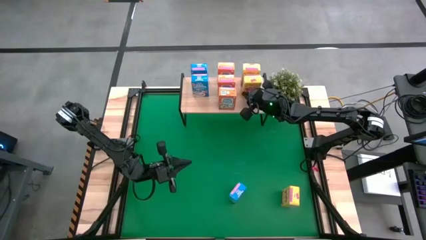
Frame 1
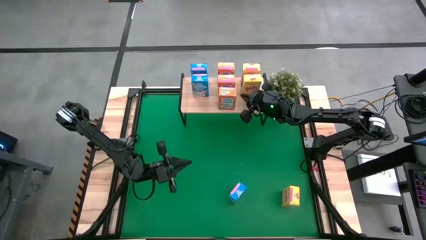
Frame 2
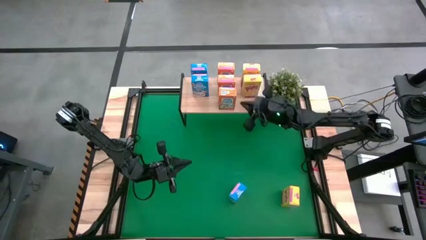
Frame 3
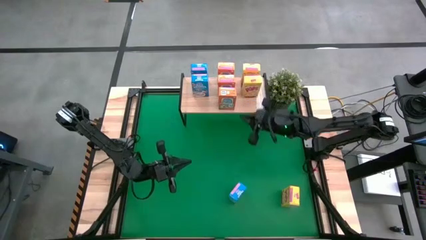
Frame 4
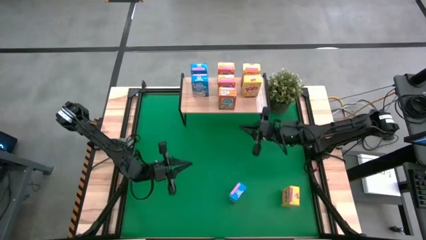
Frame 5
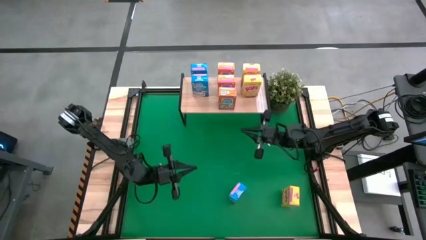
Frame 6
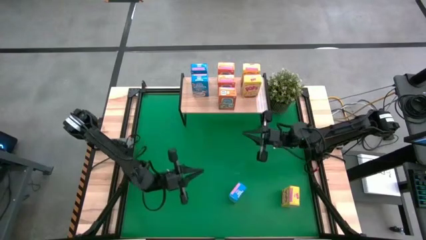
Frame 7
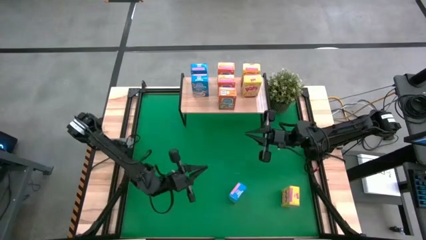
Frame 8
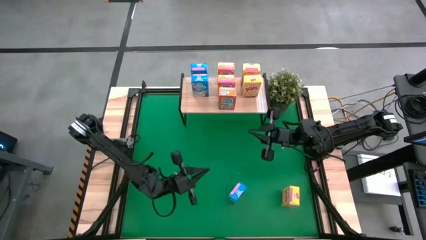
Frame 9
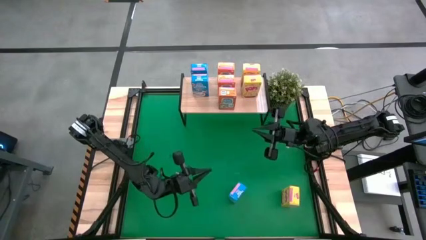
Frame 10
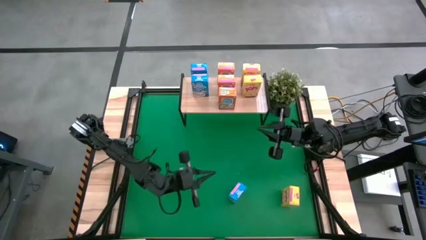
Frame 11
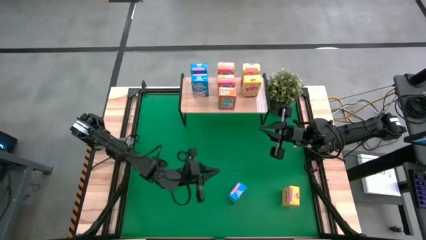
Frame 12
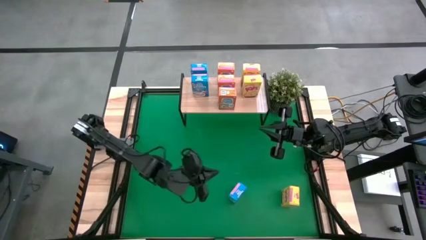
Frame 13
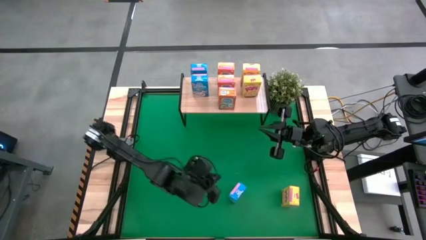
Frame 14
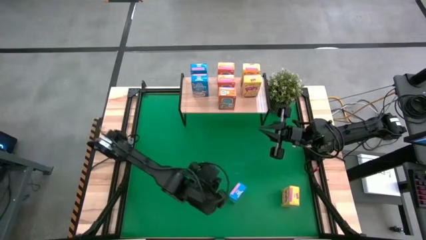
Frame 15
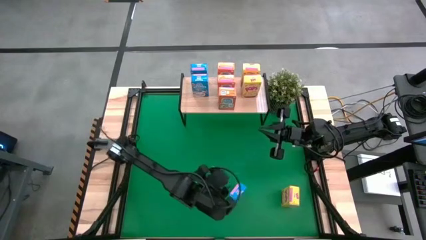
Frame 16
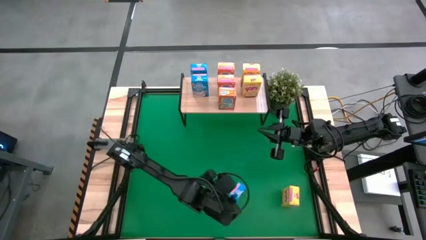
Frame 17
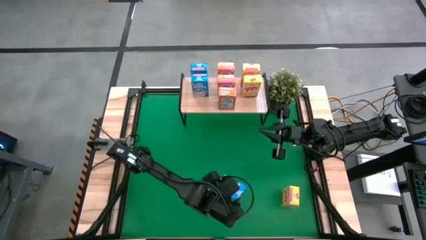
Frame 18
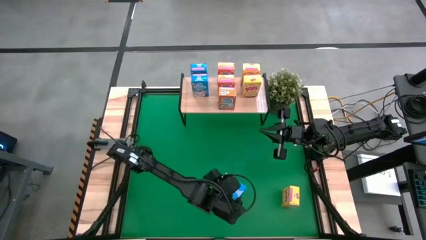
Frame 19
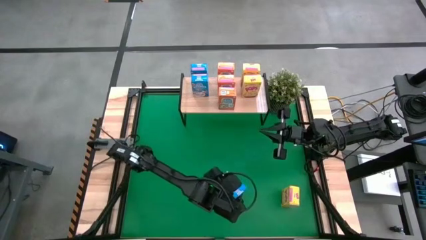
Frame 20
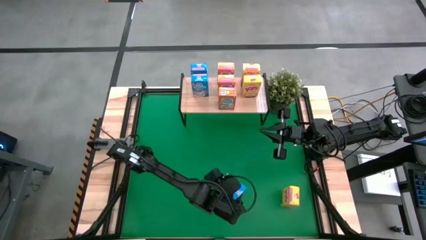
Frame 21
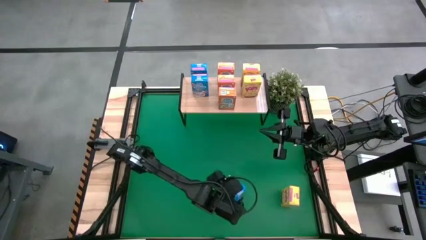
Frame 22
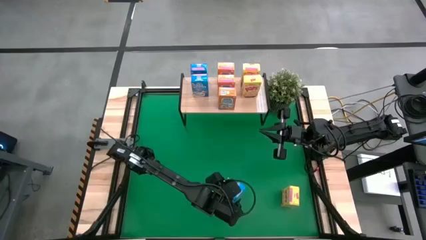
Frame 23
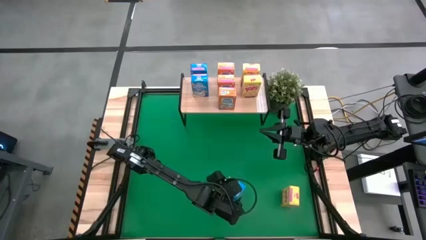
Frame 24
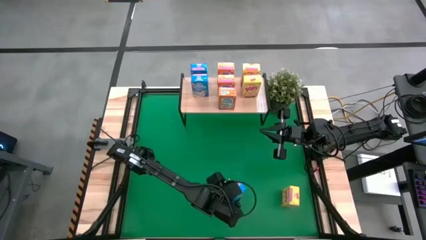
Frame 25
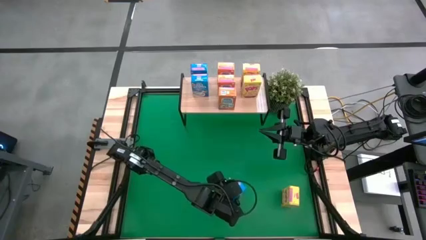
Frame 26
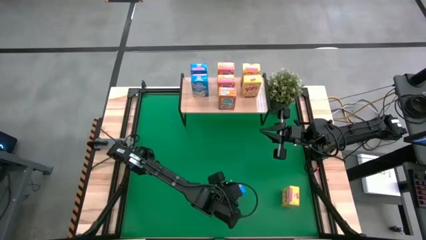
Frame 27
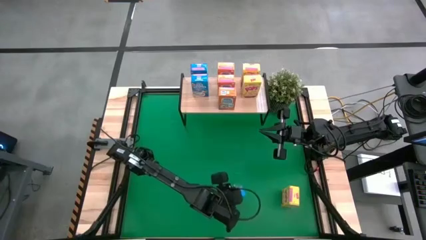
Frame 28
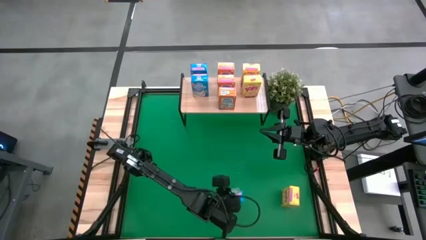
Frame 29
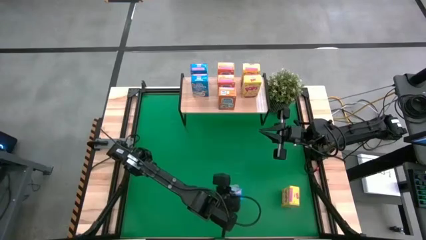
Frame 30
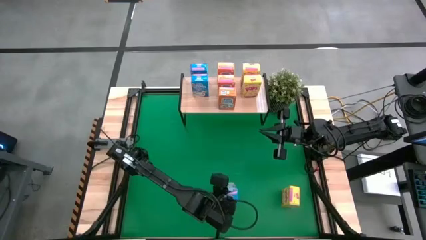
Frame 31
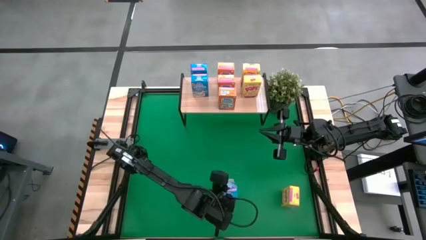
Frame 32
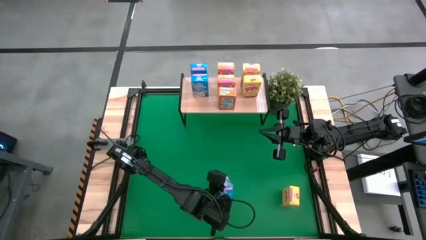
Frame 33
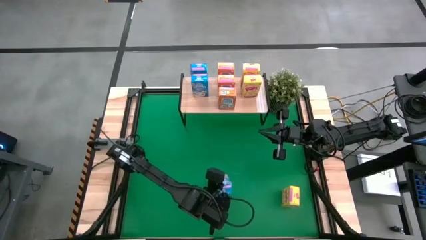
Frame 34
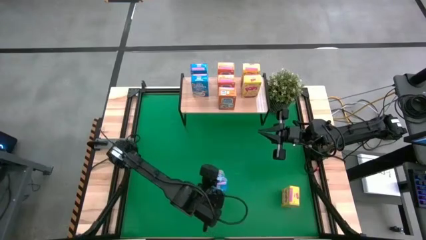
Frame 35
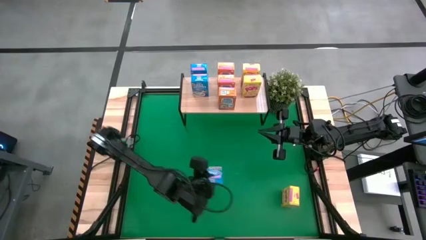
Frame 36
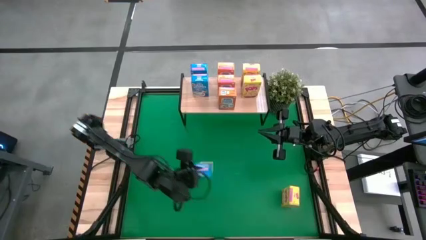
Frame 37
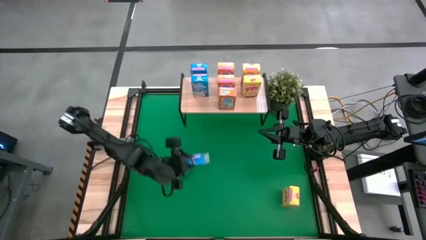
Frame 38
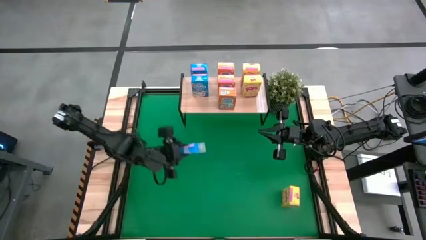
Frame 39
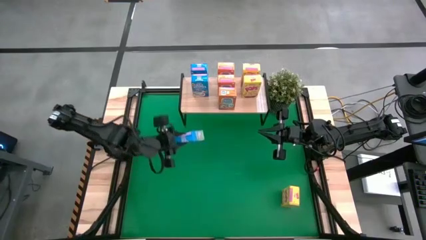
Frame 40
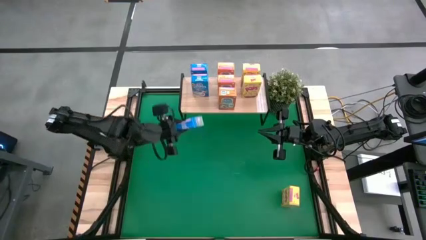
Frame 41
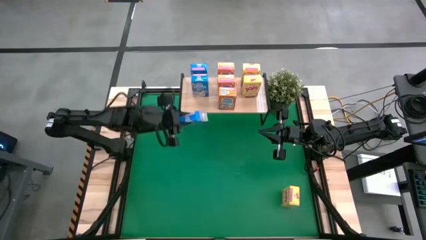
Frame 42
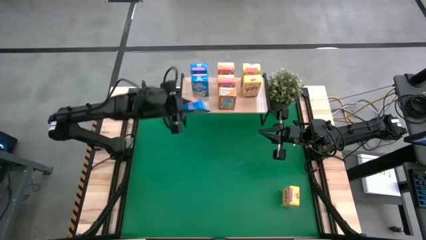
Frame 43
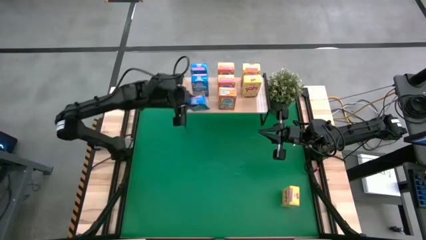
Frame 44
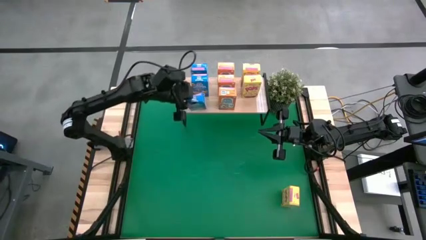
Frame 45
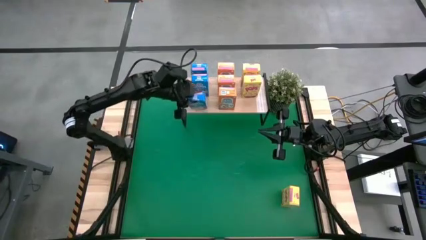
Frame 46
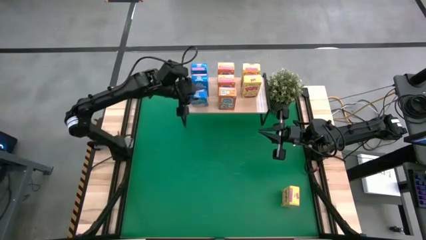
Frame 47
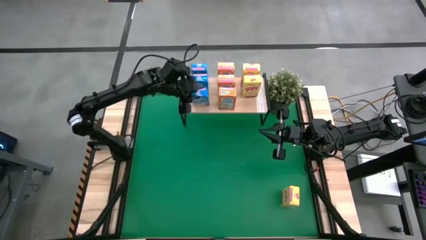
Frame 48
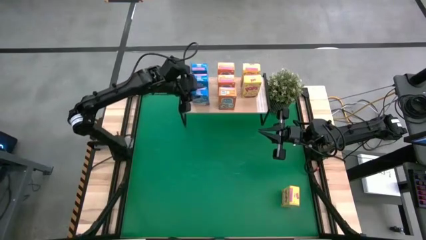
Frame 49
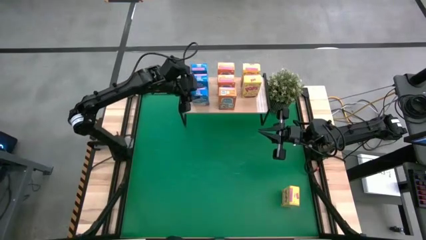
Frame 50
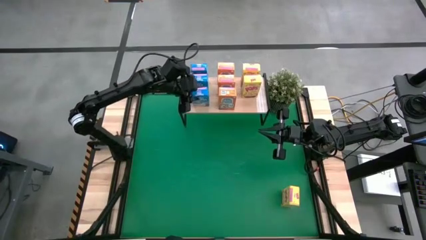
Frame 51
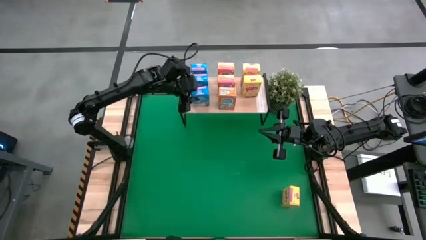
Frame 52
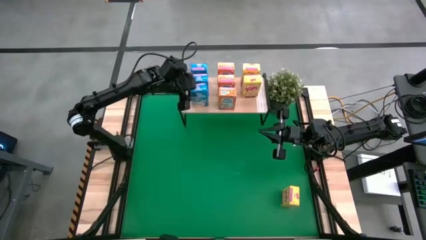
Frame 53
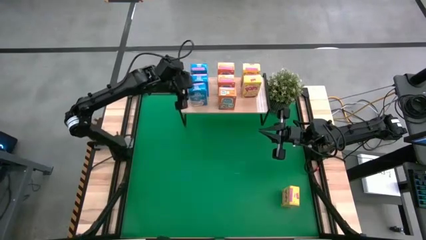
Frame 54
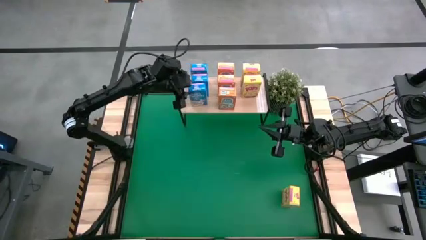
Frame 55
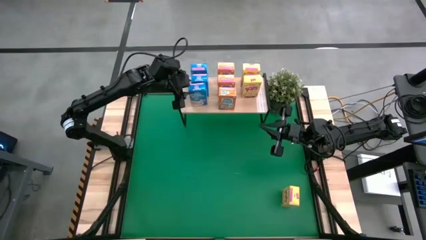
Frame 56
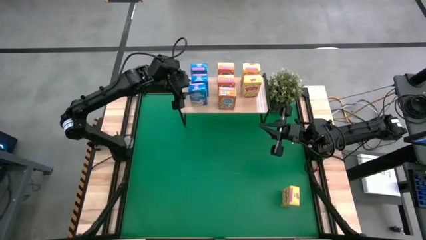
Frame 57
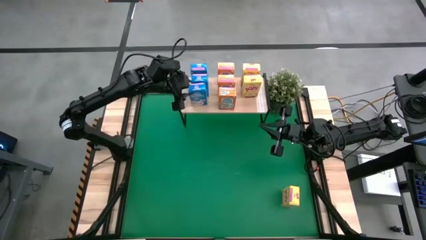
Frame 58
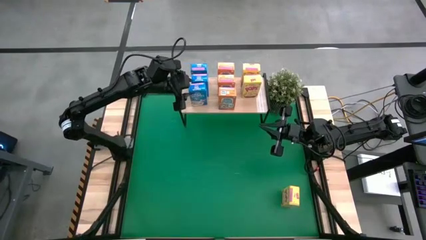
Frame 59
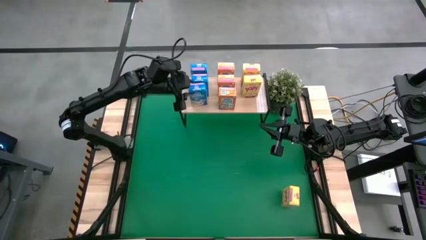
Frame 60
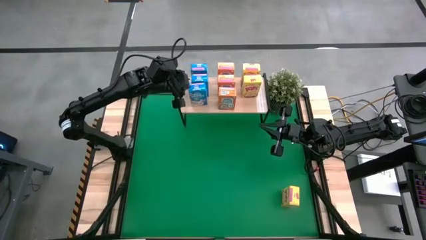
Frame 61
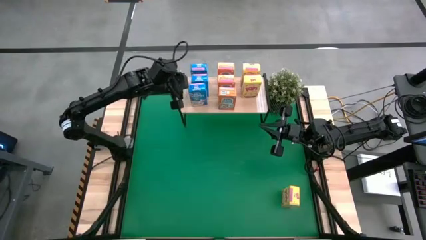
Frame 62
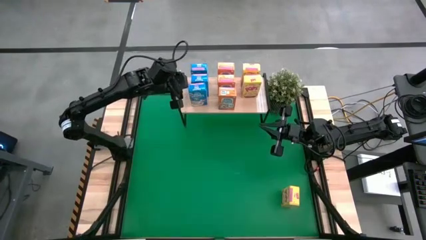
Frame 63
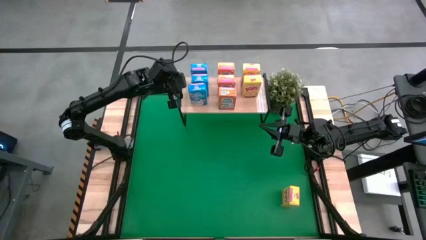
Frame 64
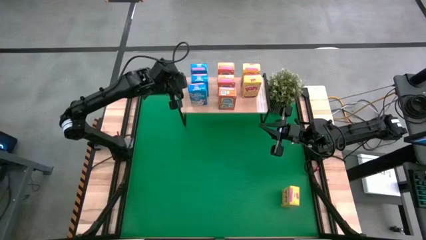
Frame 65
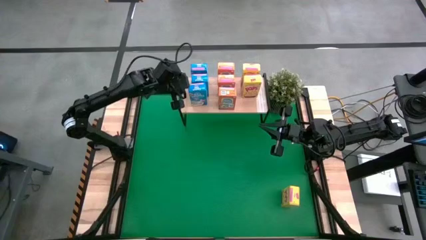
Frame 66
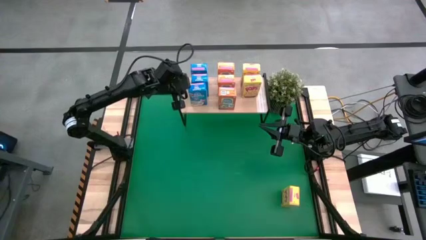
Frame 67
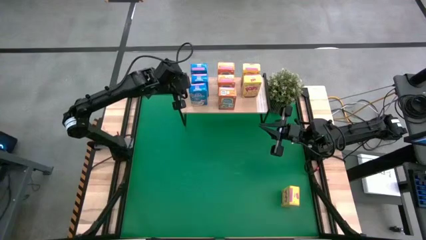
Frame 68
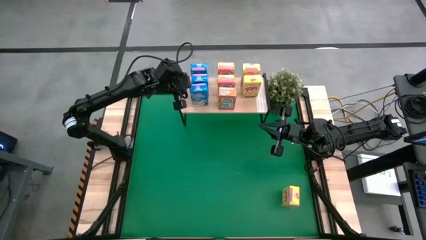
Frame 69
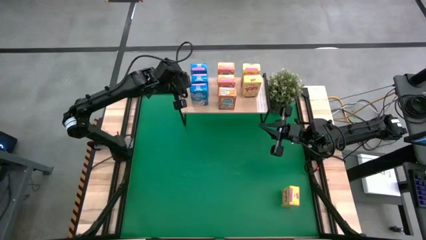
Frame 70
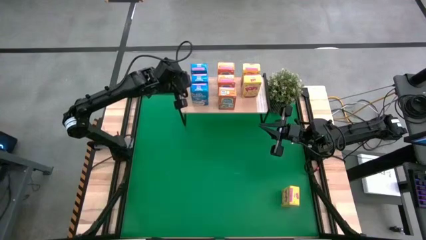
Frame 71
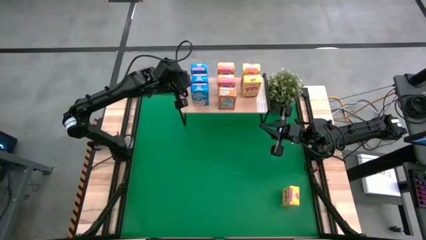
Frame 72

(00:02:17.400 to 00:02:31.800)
Task: Stack cereal on shelf
Put the blue cereal box on the shelf

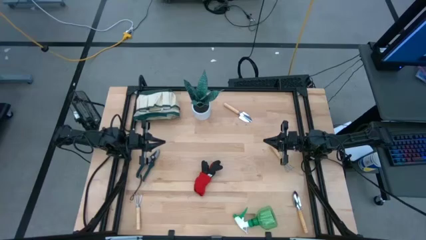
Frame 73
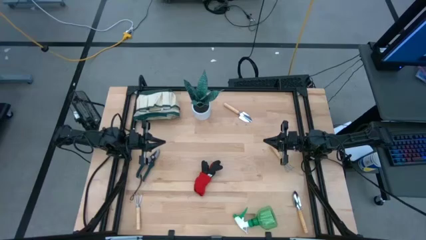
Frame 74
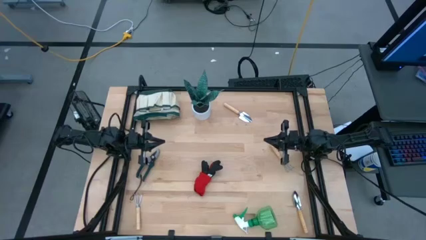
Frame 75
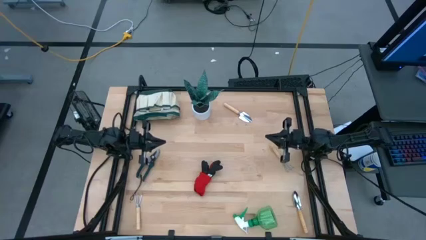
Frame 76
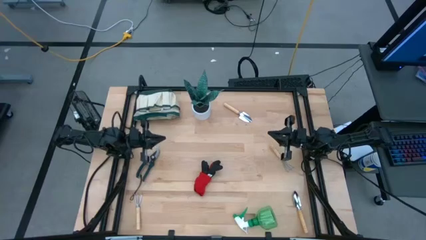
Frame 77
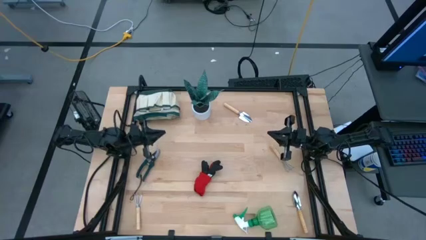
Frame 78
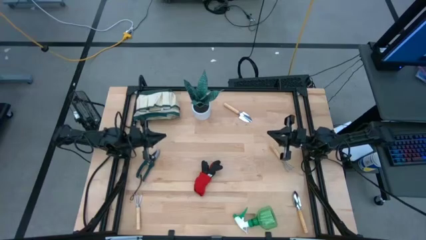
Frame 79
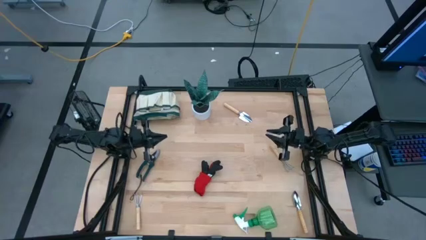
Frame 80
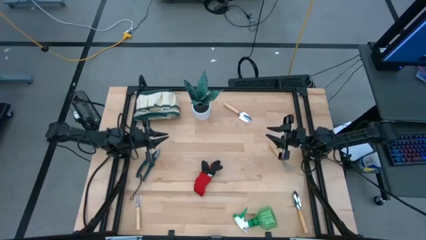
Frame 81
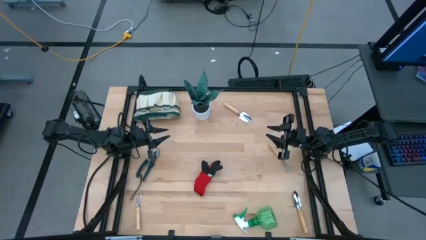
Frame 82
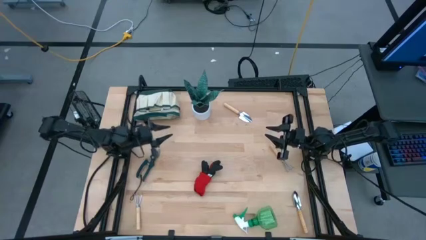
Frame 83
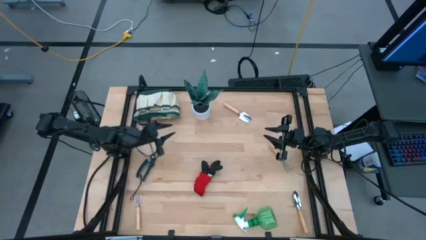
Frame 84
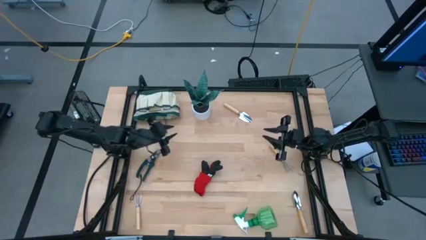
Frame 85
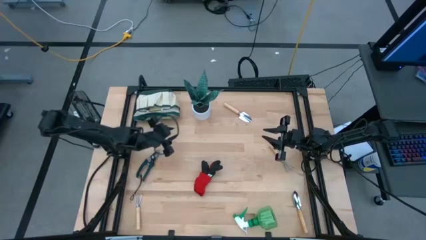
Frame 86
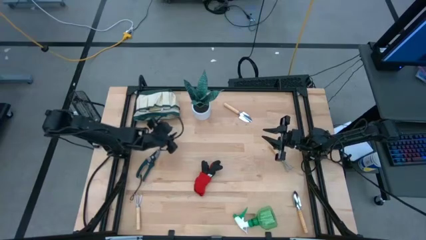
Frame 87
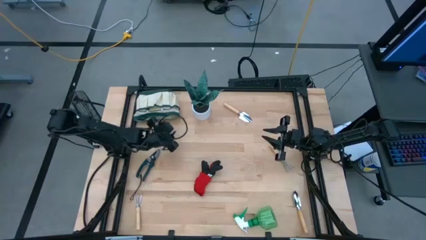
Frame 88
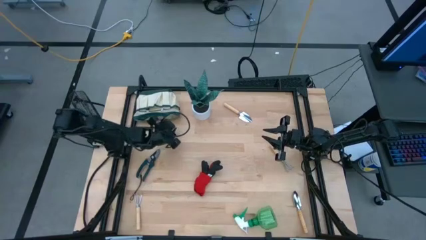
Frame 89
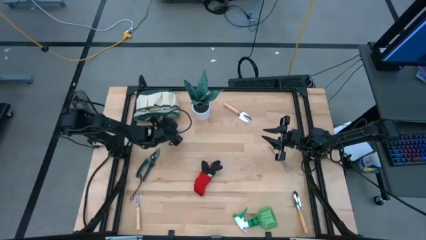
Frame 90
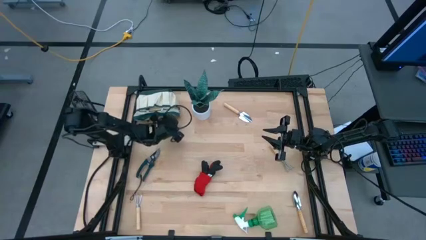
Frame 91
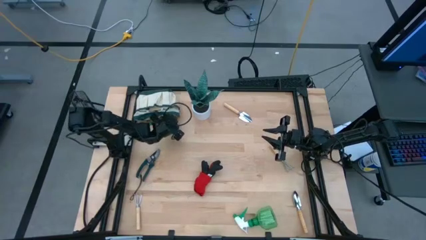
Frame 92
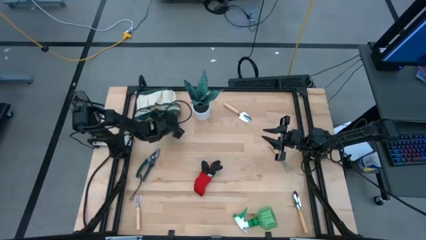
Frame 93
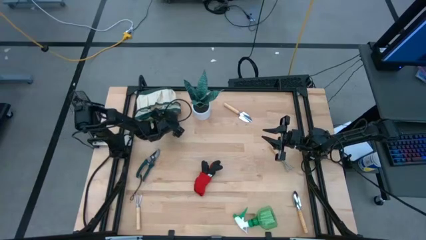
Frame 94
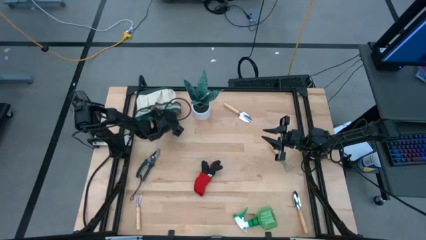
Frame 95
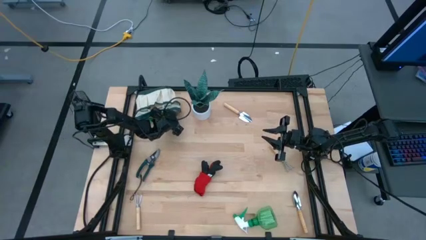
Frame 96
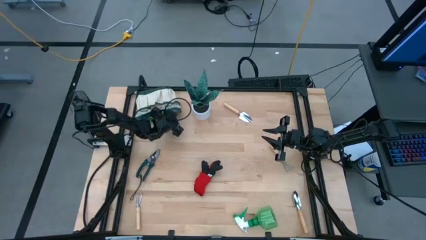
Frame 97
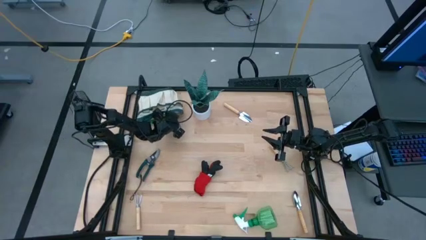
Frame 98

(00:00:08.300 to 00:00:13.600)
Task: Pick & Place Garden tools in Gardening bag
Prepare the gardening bag
